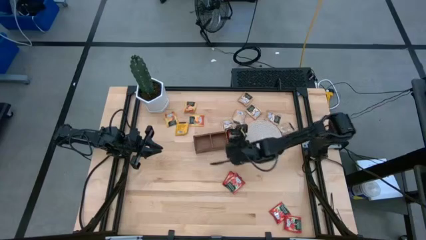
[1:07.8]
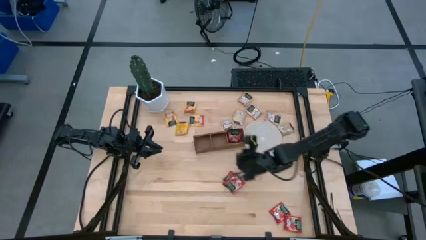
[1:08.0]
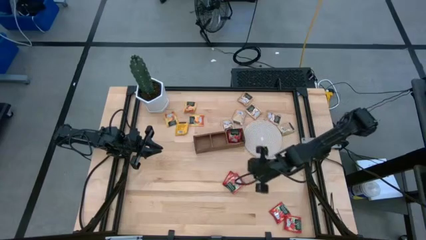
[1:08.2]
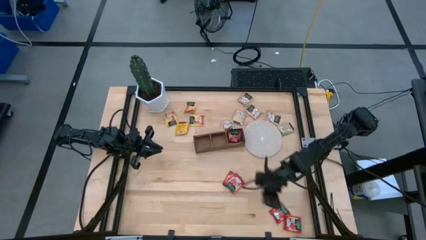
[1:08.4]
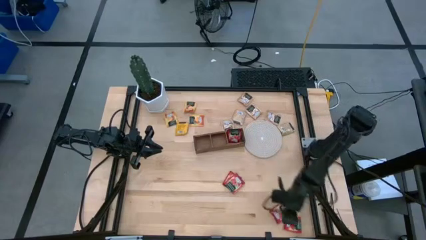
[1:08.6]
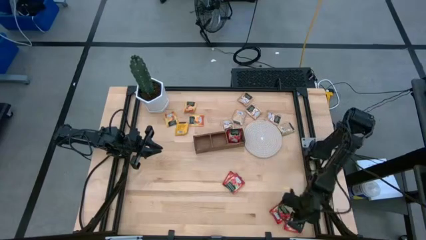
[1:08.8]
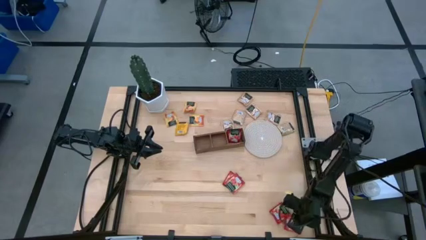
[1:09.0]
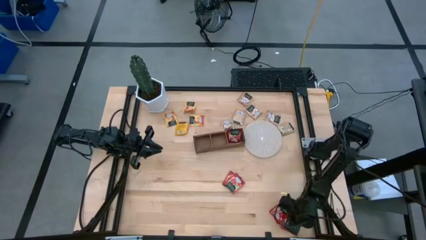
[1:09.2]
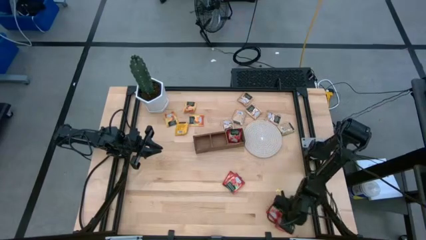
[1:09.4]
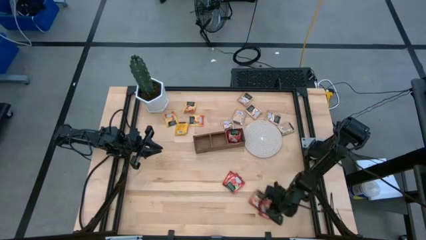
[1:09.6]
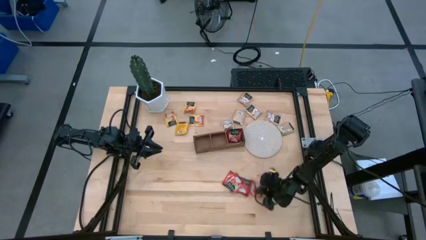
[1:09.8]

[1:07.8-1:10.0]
Task: Pick & Place Tea
Move the red tea bags to the center of the table

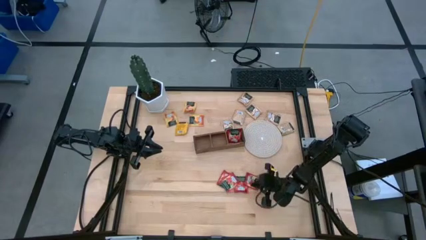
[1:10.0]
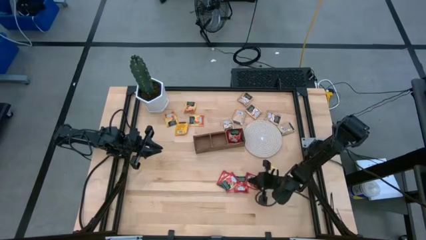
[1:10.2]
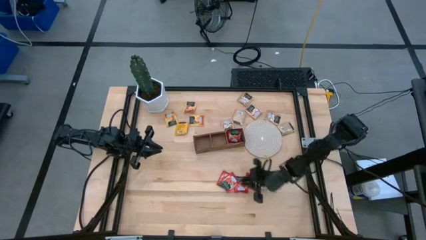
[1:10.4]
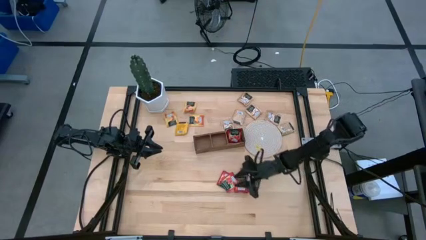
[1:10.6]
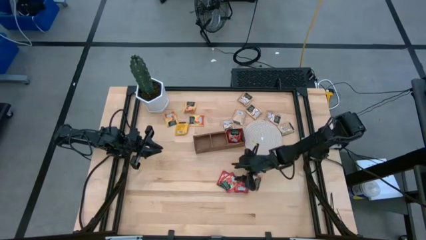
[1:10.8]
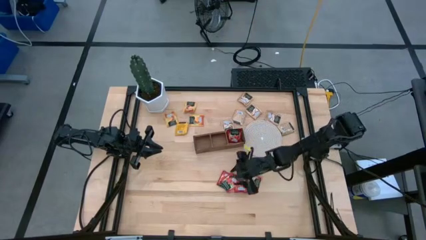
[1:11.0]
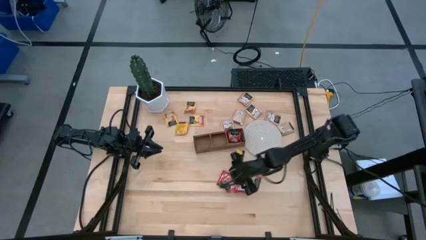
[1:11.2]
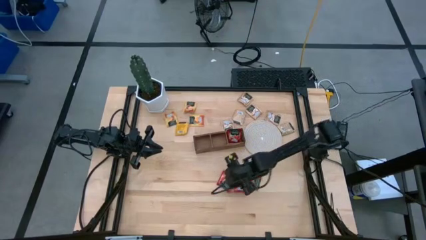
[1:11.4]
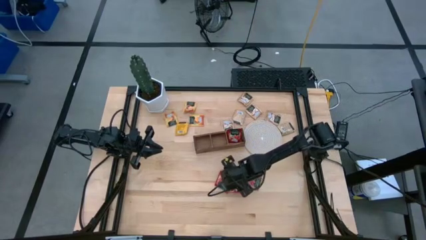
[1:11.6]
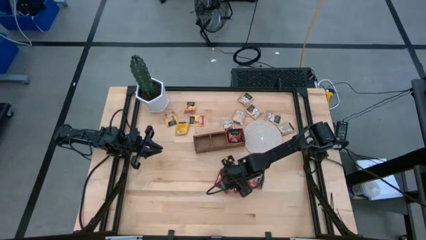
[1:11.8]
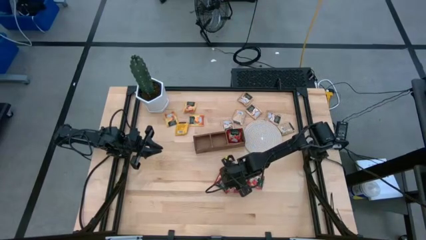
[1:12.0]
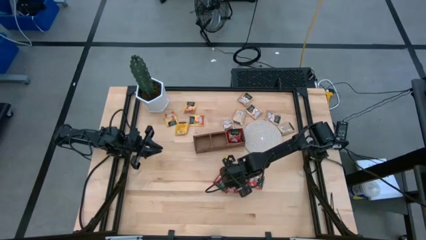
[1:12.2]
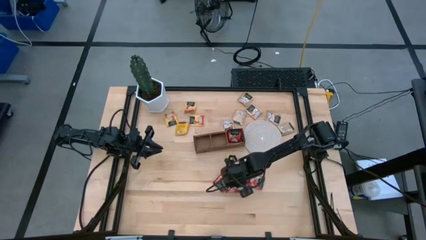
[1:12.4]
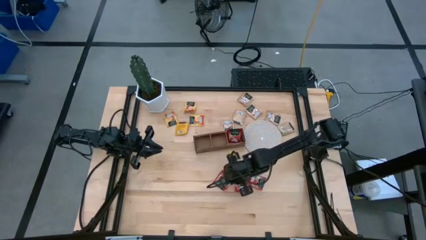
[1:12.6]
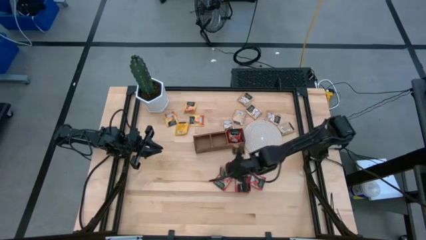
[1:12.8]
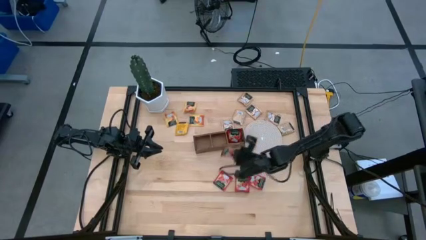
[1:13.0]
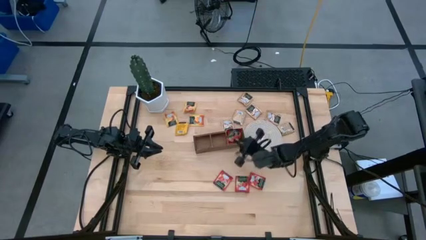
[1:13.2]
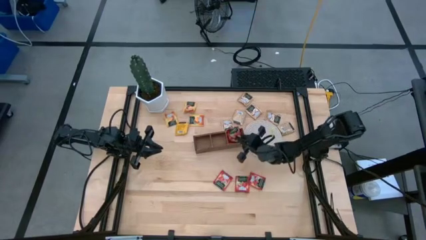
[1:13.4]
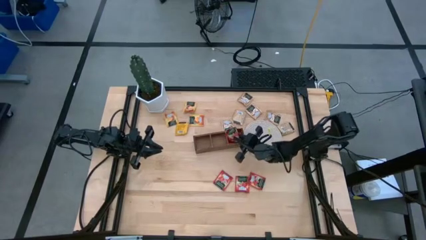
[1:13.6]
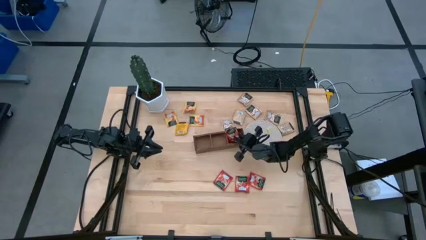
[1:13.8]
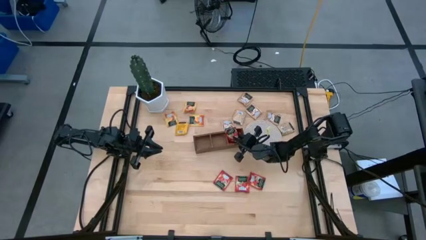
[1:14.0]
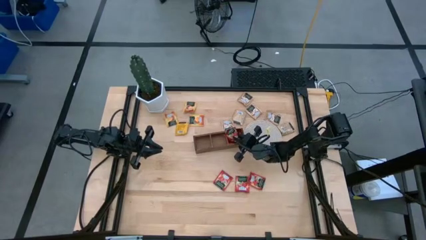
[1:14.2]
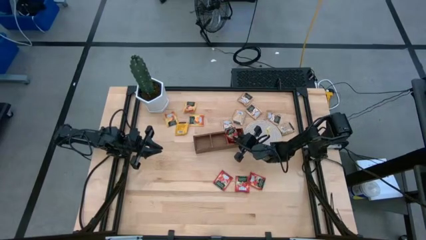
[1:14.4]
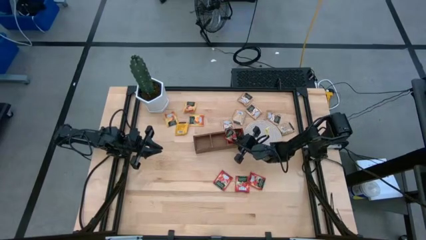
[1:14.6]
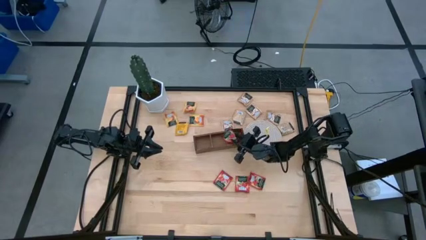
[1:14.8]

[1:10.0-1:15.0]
Put the red tea bag into the right section of the wooden organizer

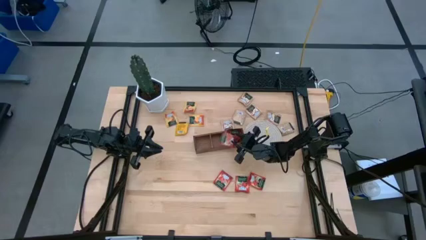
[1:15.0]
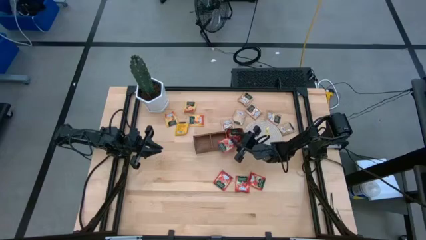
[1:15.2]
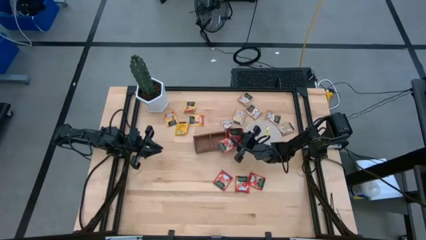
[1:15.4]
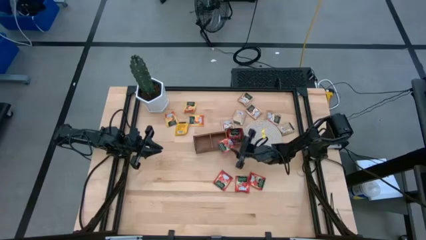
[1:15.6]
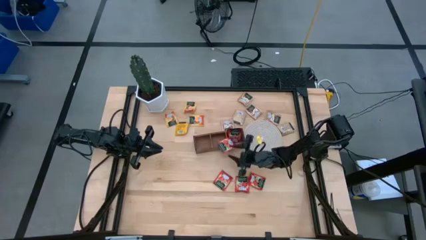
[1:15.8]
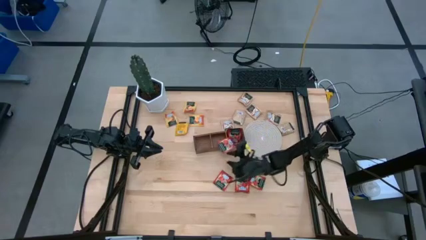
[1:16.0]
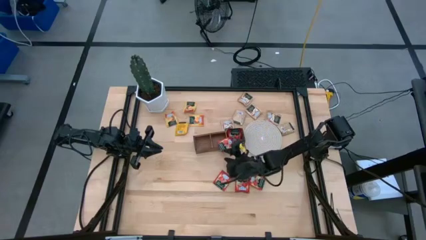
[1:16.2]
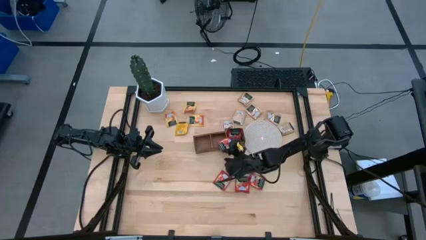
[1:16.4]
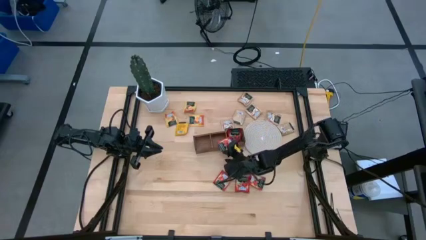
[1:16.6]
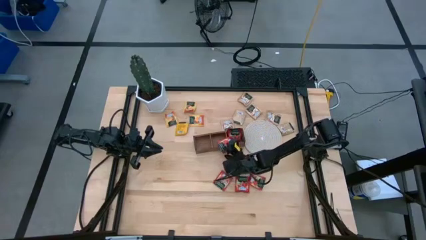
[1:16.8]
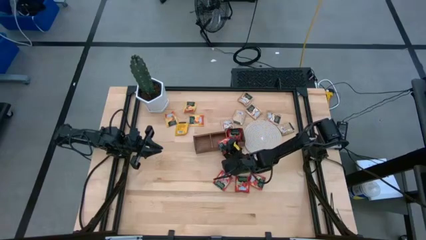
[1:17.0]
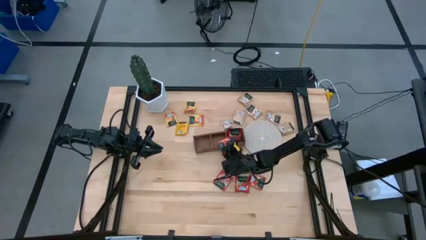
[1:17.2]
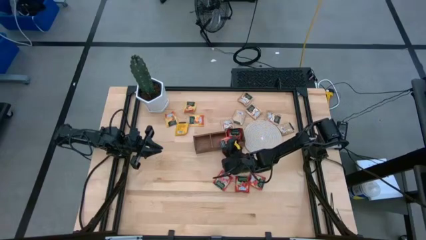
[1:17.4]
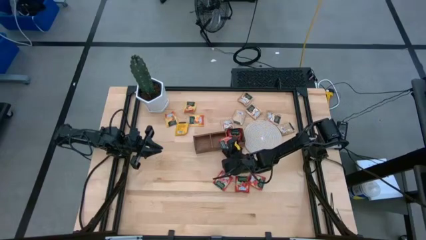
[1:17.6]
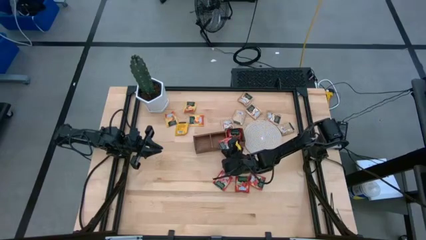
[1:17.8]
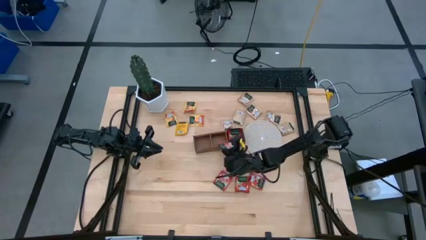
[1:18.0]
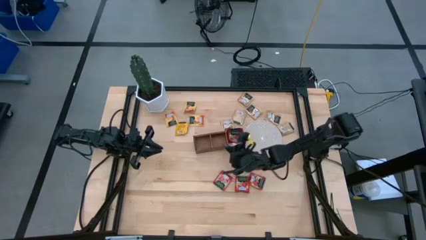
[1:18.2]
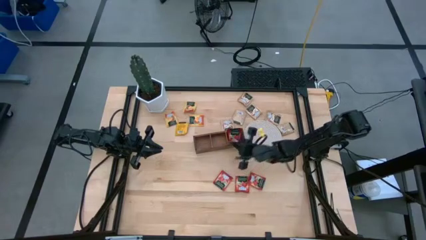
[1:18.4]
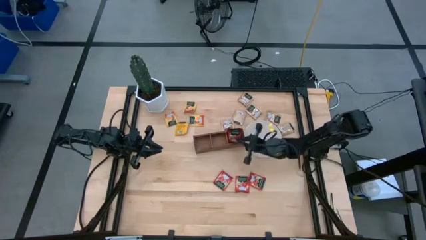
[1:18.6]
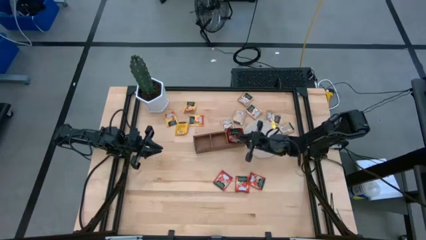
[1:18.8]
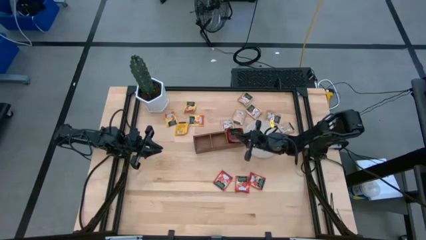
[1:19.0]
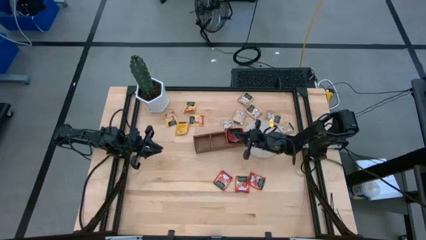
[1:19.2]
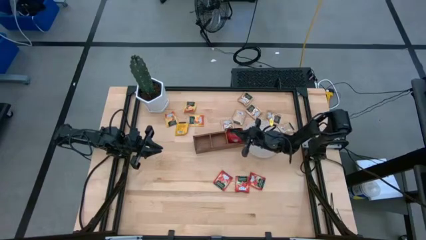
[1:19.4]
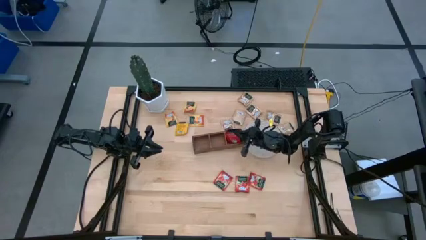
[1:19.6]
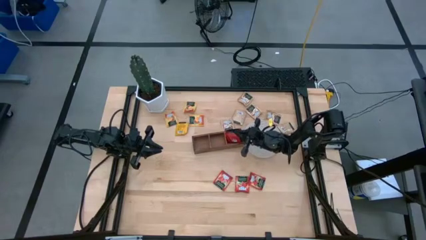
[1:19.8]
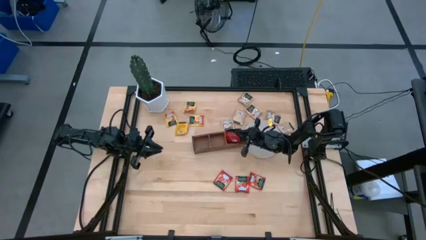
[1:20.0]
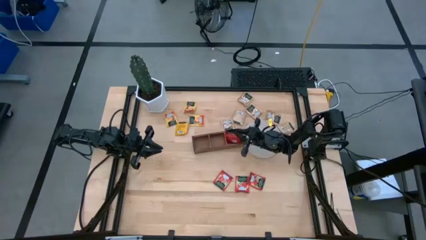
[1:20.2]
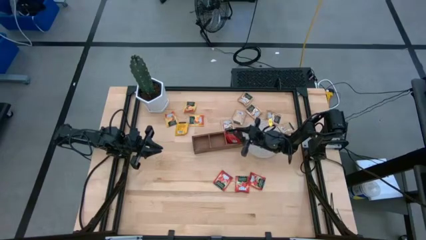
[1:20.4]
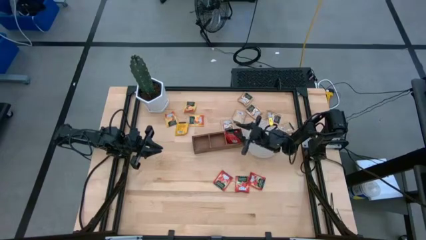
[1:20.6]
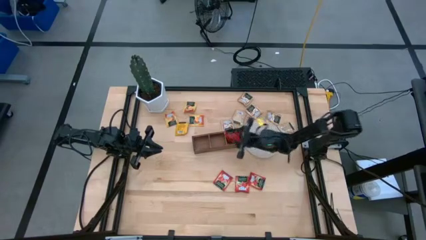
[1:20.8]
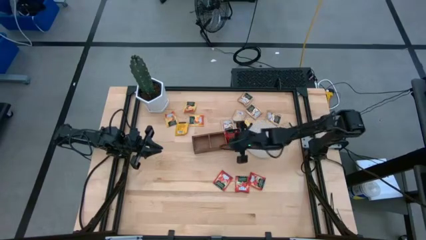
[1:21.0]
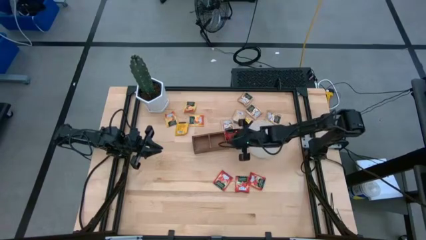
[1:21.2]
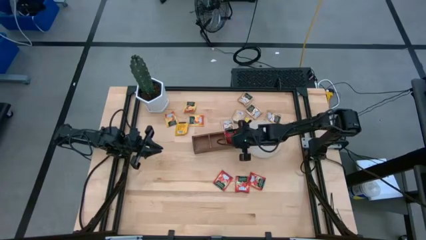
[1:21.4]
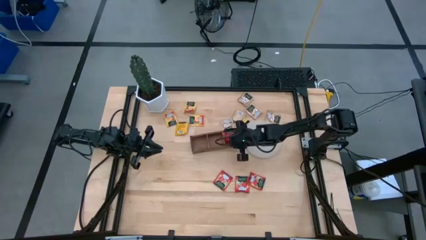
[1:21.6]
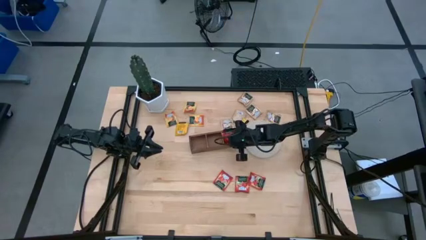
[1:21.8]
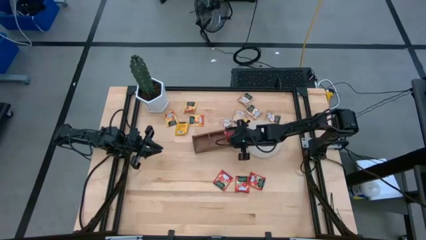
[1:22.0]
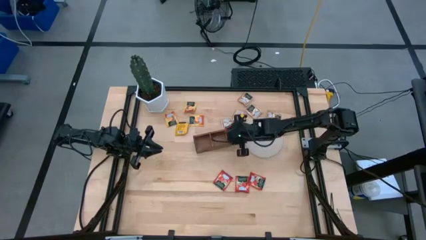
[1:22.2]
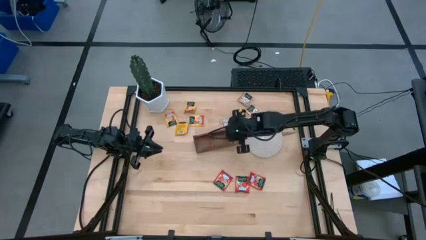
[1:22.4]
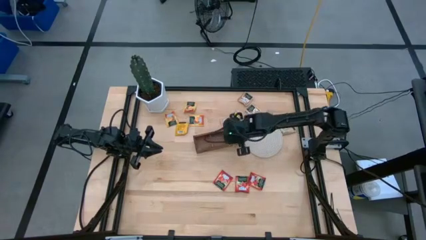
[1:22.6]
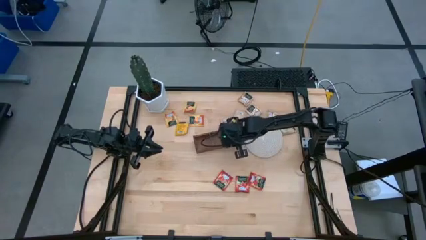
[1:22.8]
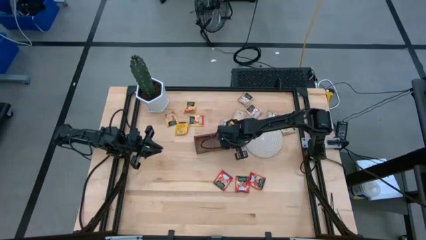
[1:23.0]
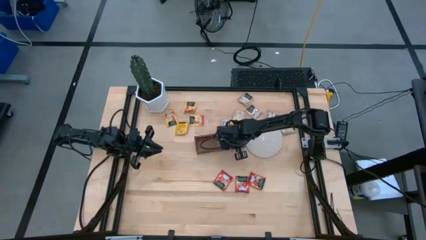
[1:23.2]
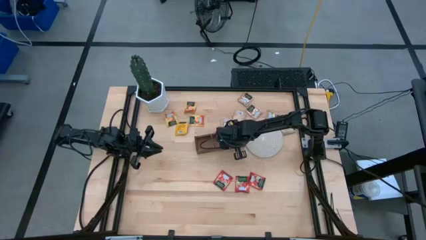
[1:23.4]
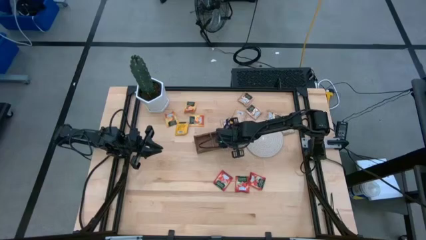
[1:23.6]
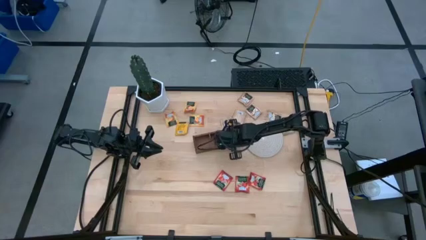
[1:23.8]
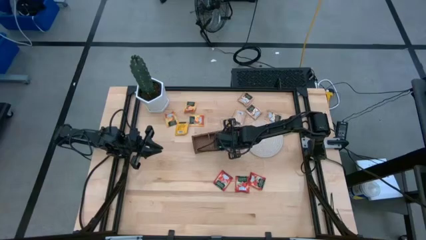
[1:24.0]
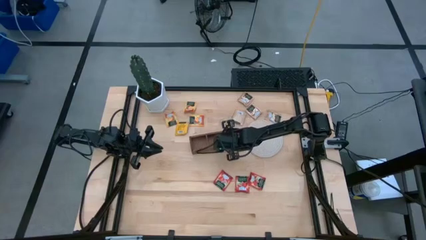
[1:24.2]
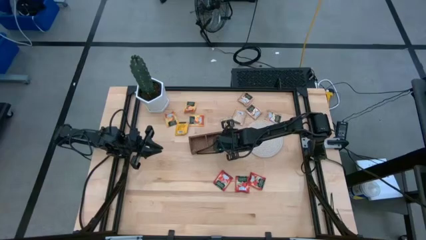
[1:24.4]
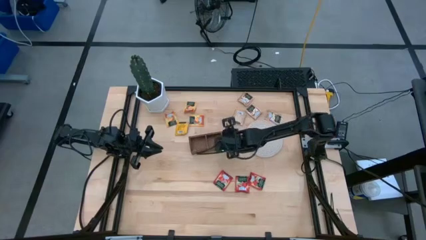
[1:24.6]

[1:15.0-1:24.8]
Put the red tea bag into the right section of the wooden organizer
